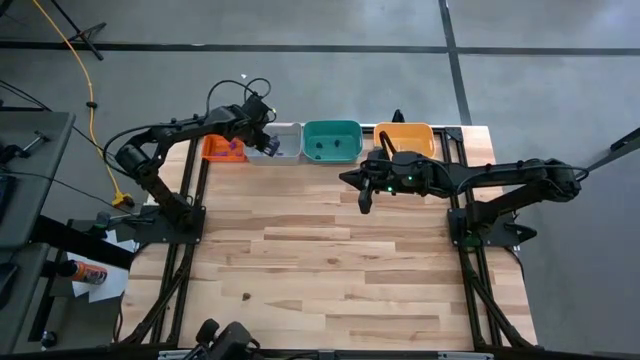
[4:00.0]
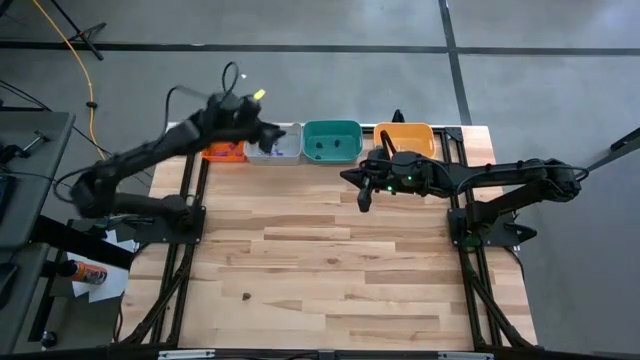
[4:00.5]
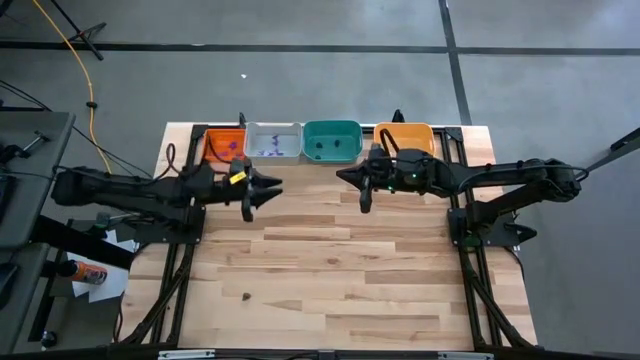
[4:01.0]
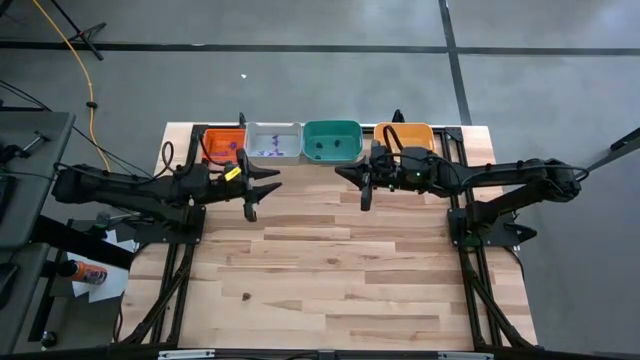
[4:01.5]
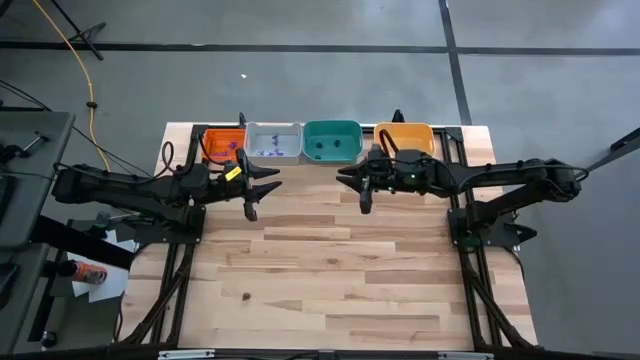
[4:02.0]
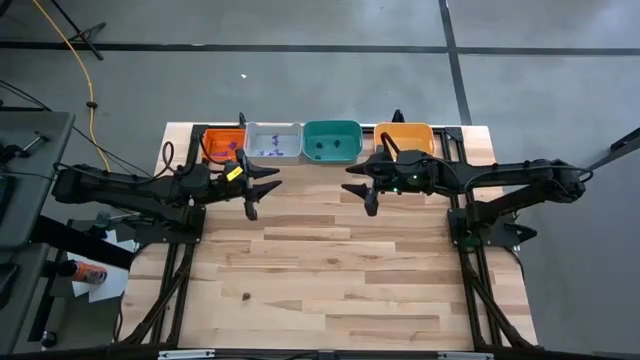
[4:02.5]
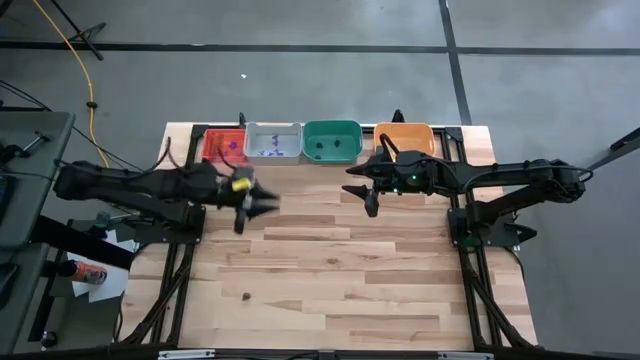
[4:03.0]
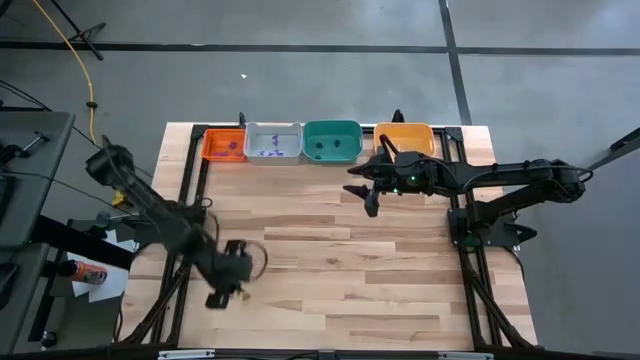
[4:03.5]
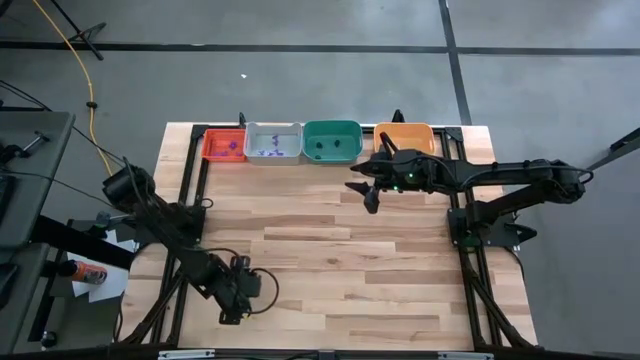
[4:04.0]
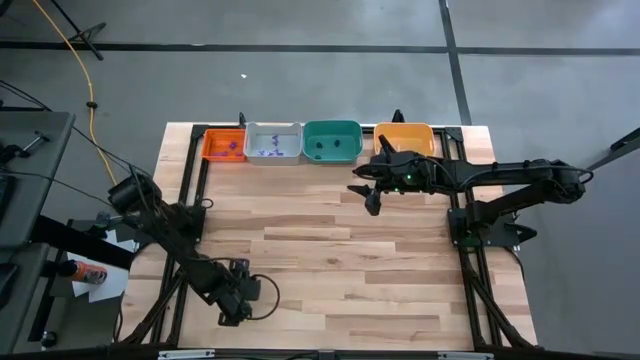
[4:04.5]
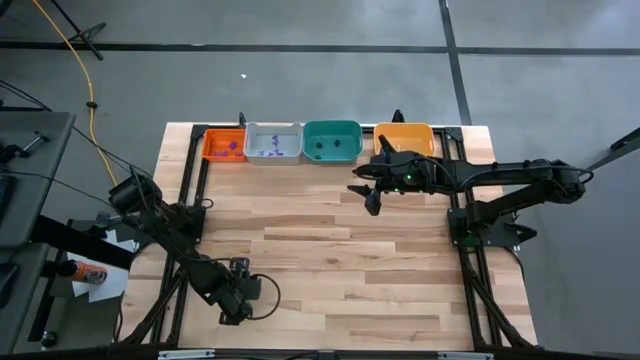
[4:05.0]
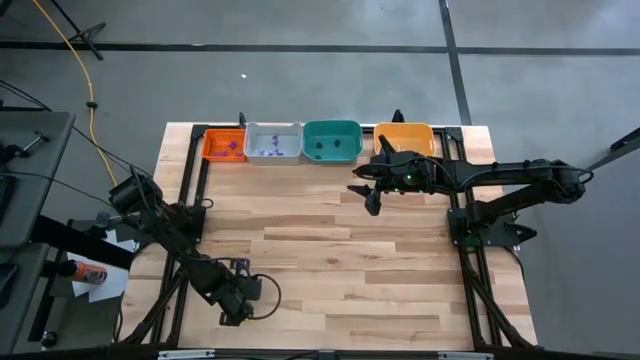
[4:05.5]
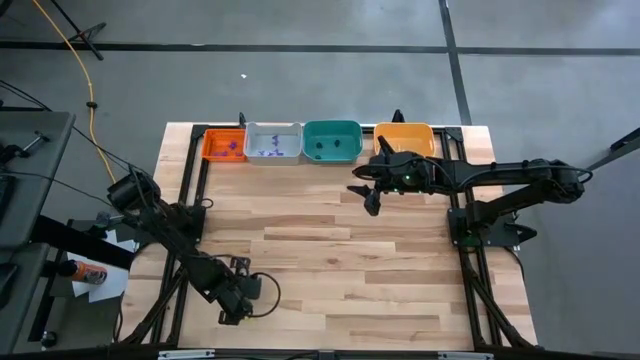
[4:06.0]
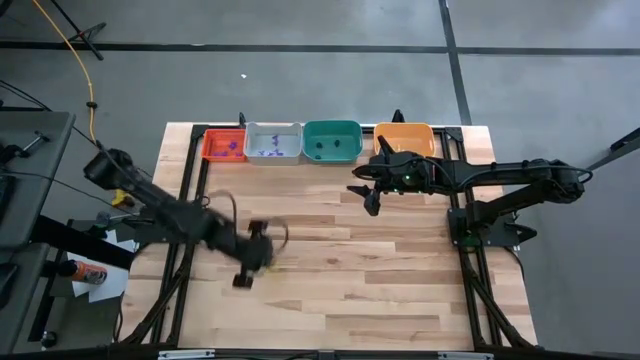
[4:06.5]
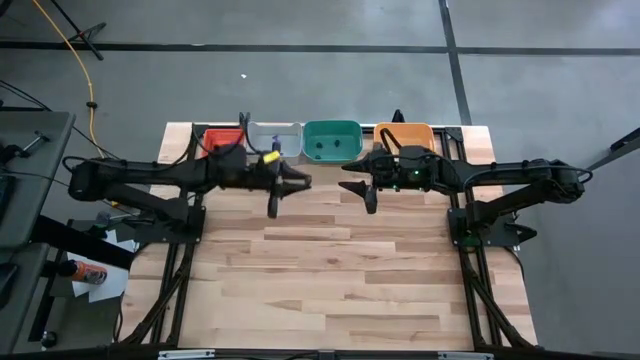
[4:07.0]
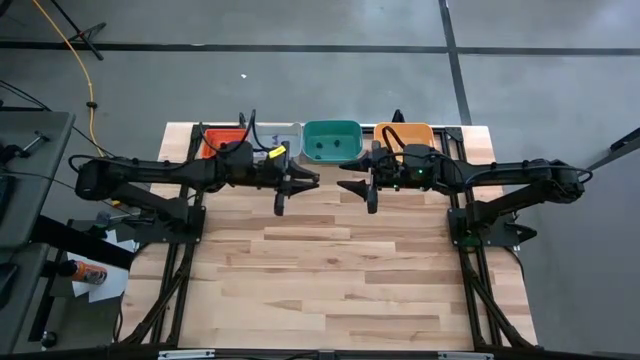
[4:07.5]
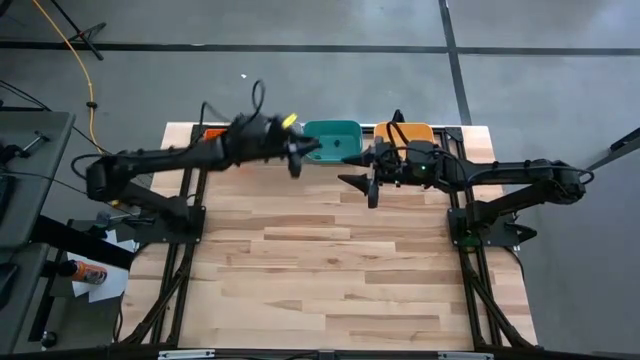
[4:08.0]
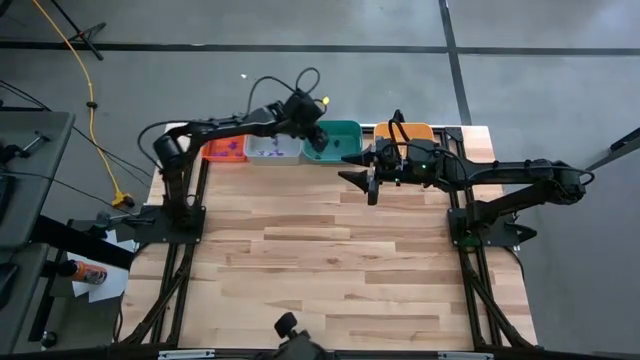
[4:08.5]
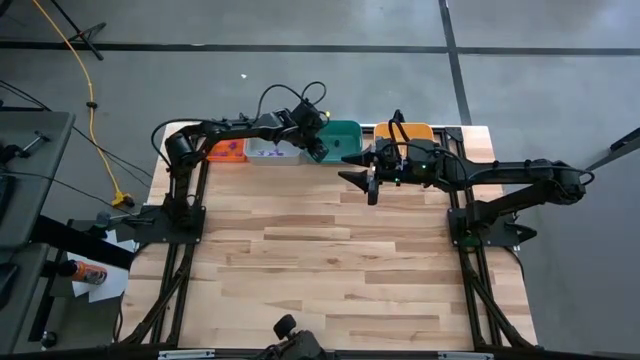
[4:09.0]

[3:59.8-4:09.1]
Task: Sort Halloween decoration
Put the black skull into the green bin

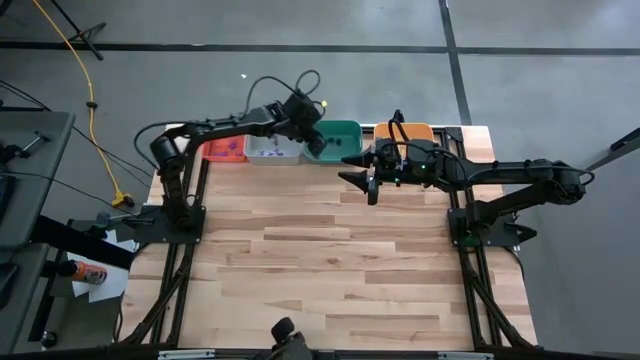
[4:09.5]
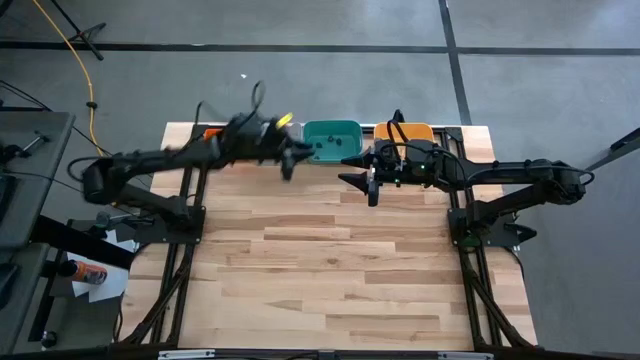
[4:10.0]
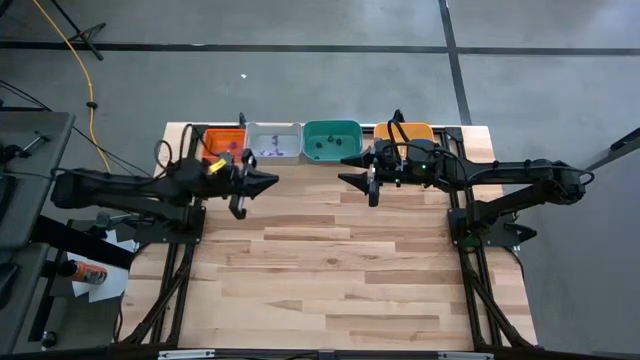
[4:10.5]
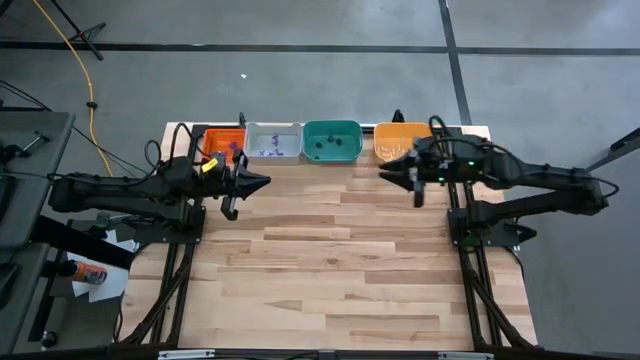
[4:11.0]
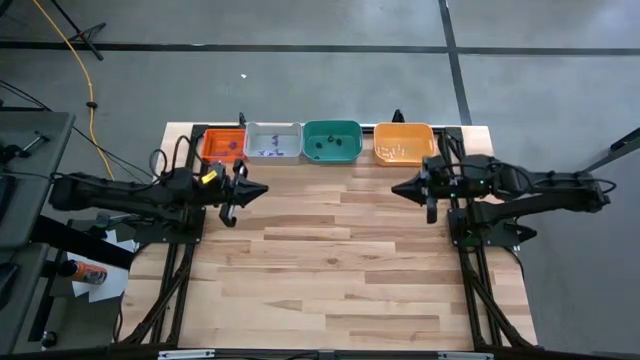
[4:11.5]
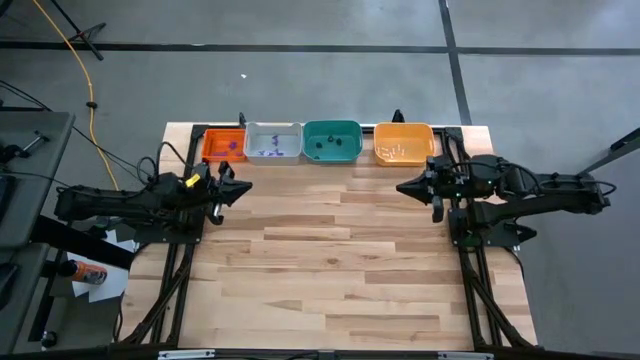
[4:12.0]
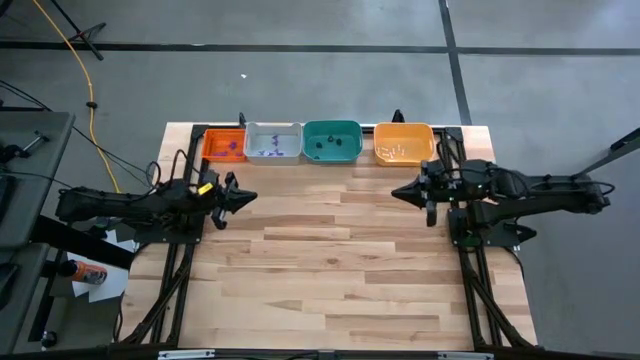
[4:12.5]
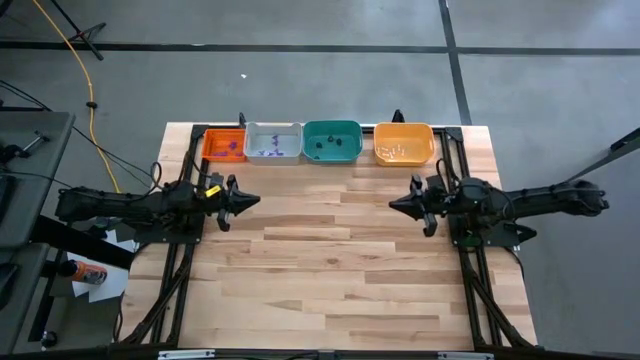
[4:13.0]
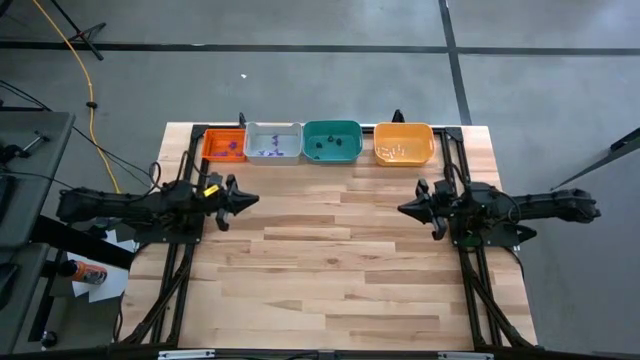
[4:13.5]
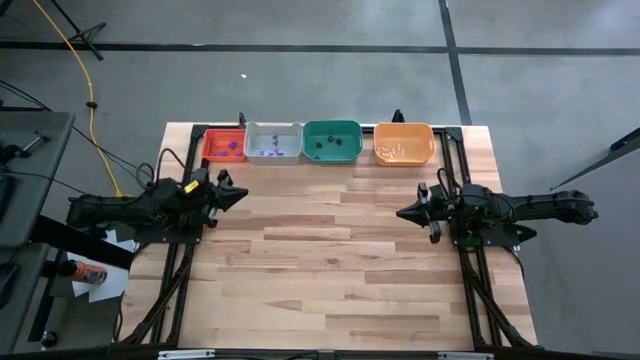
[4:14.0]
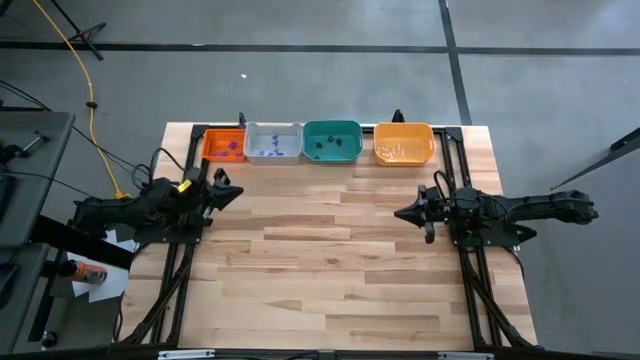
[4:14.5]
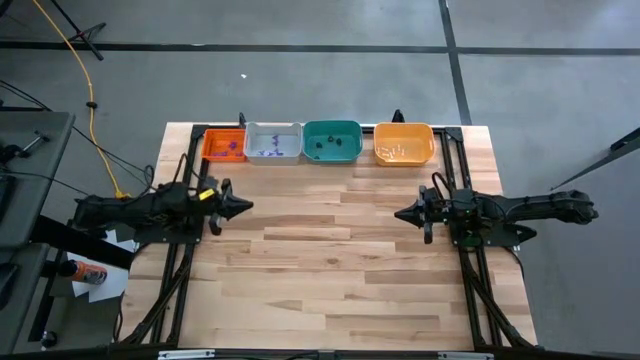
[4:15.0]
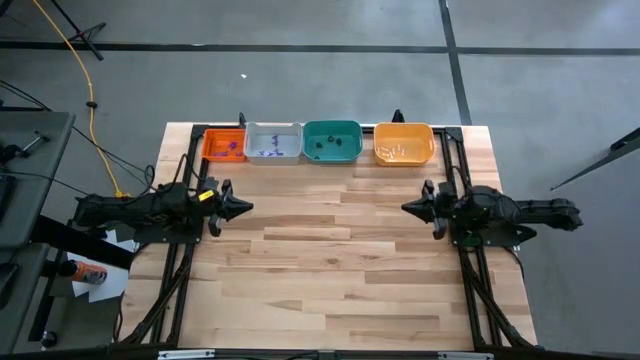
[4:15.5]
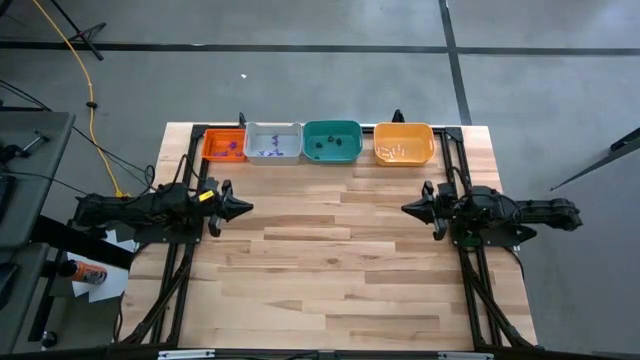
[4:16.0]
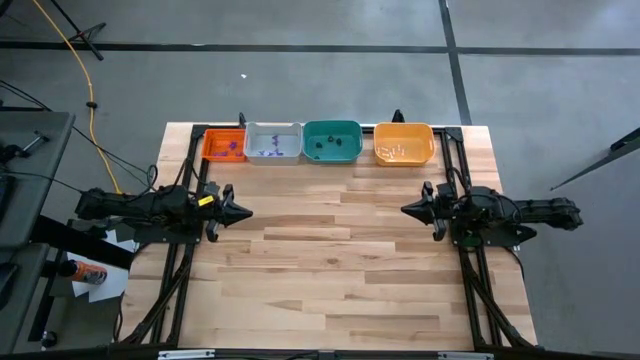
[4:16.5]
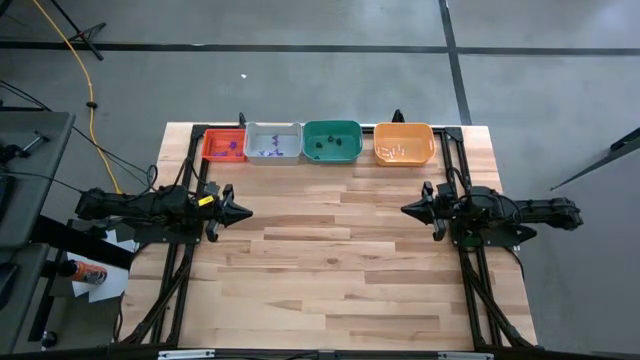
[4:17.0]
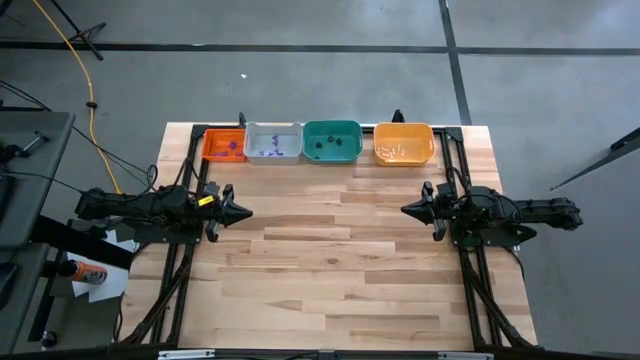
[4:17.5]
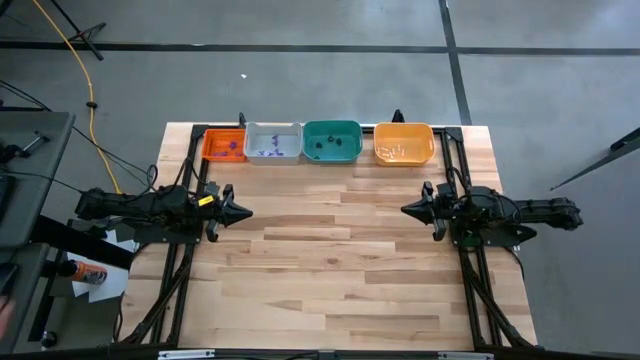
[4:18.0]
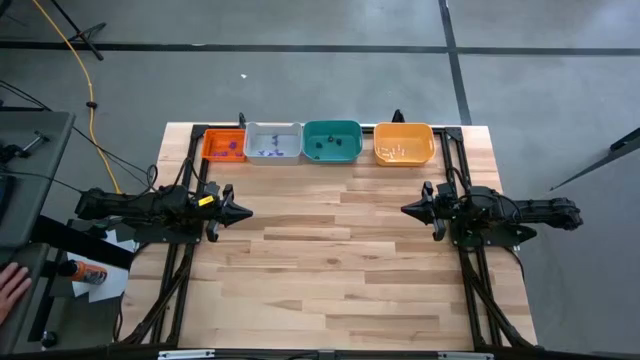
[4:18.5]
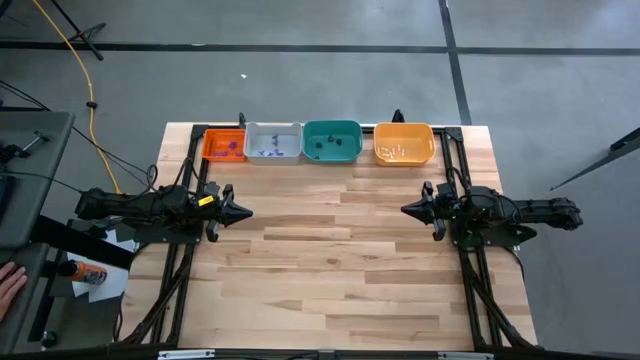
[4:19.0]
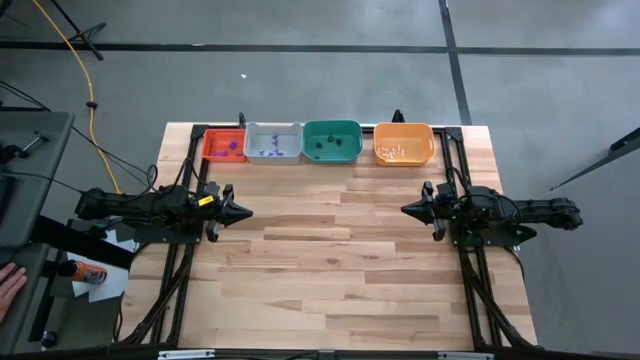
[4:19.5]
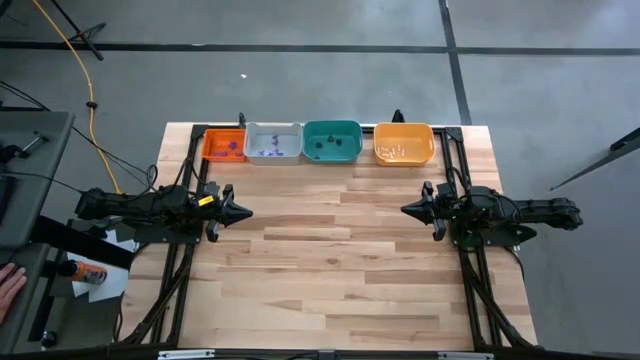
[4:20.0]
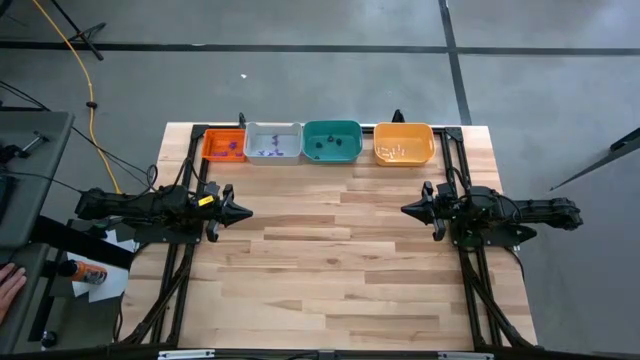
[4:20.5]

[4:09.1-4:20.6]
Return to Home Position
